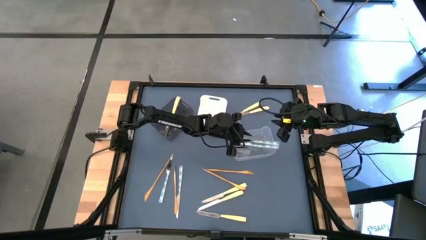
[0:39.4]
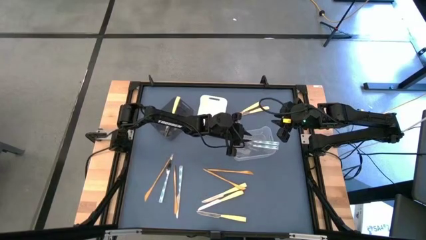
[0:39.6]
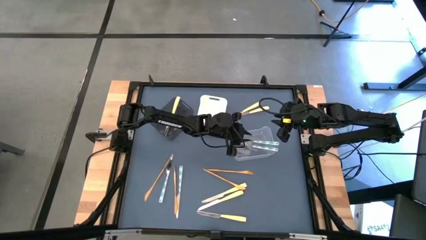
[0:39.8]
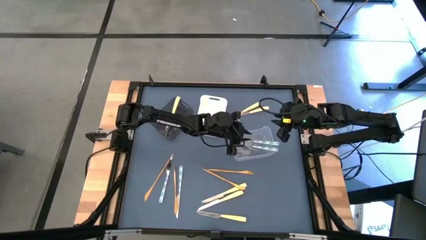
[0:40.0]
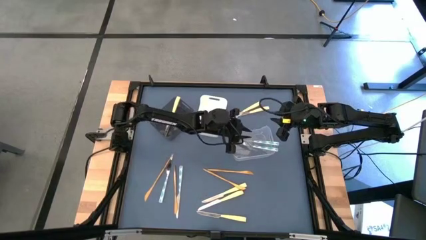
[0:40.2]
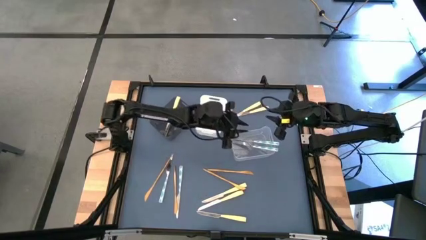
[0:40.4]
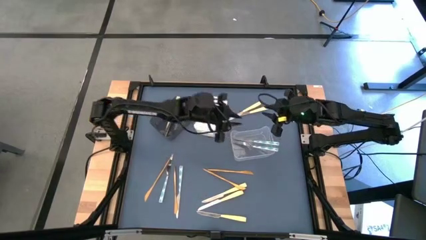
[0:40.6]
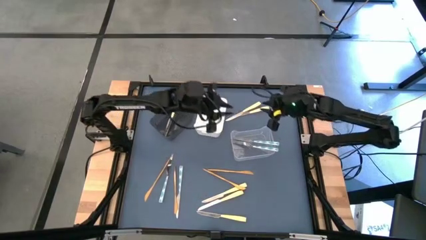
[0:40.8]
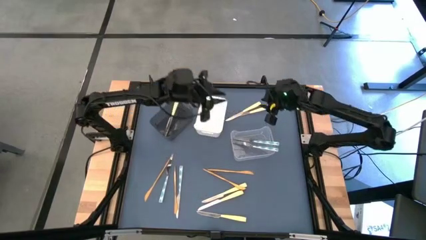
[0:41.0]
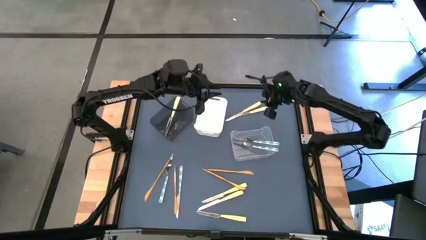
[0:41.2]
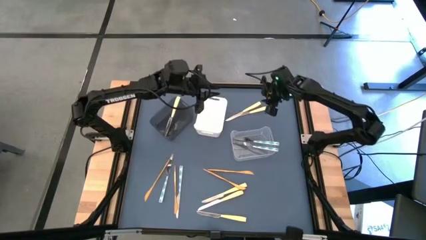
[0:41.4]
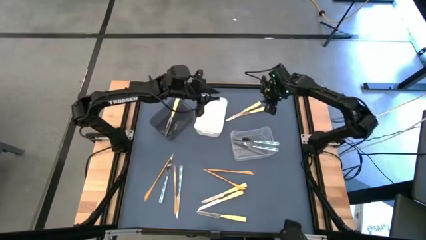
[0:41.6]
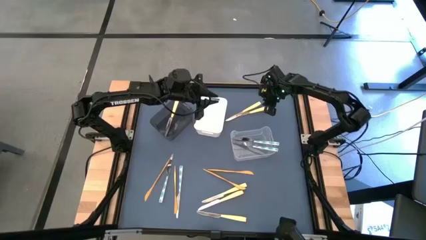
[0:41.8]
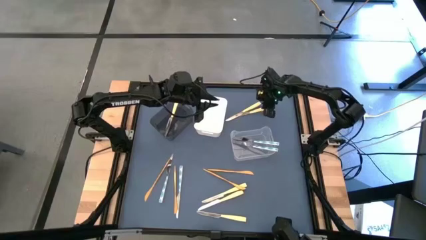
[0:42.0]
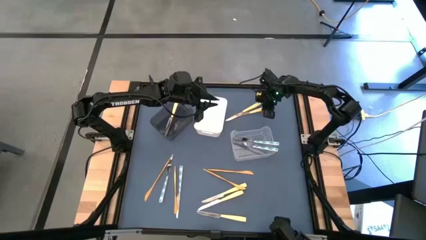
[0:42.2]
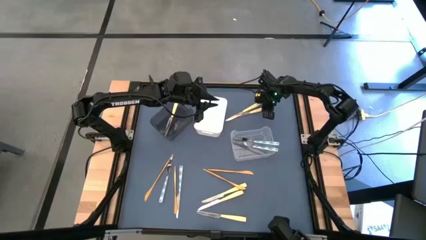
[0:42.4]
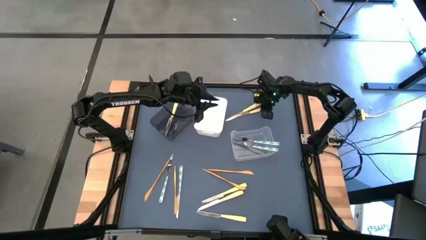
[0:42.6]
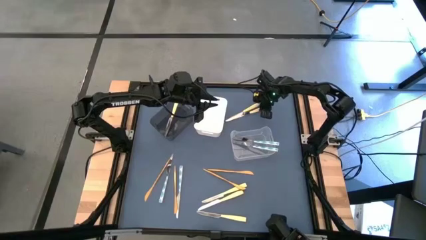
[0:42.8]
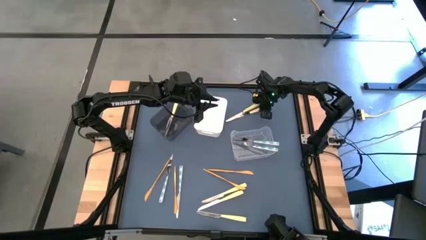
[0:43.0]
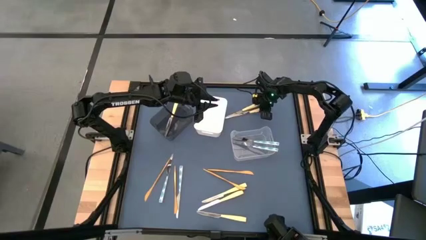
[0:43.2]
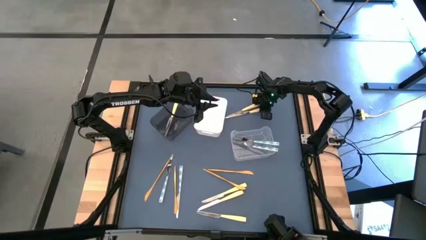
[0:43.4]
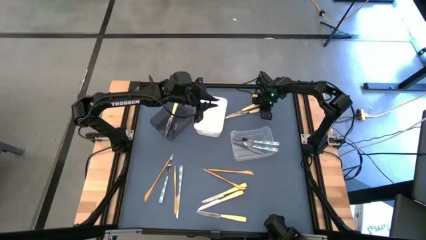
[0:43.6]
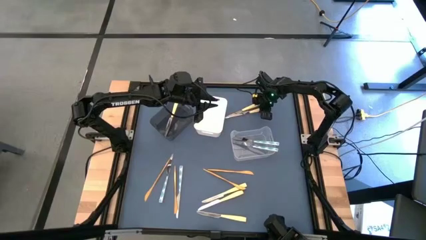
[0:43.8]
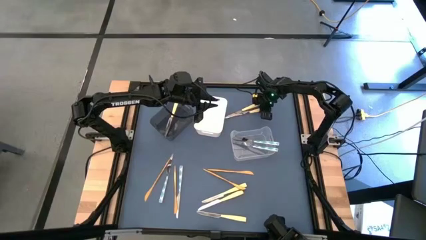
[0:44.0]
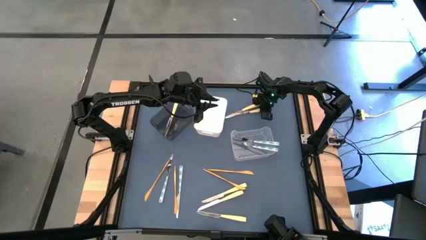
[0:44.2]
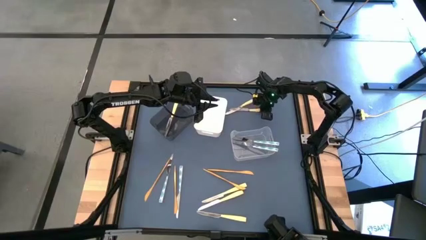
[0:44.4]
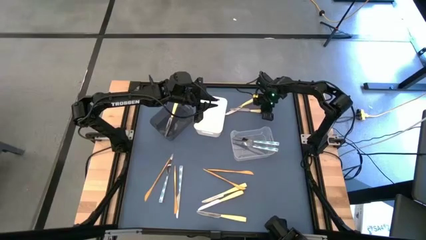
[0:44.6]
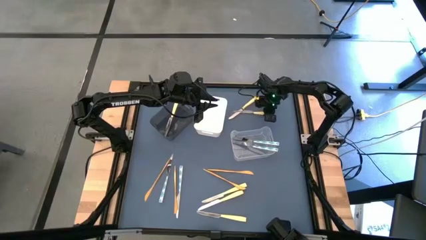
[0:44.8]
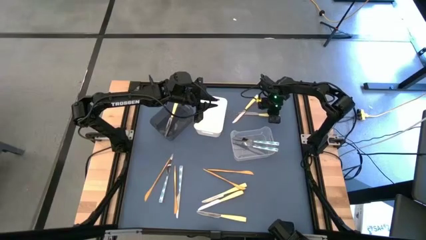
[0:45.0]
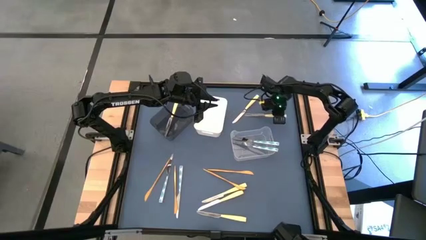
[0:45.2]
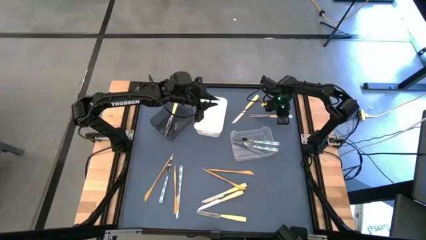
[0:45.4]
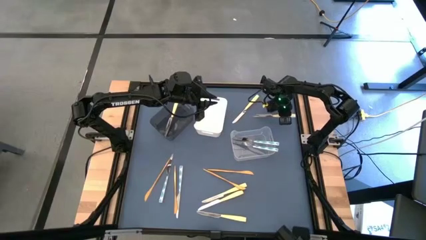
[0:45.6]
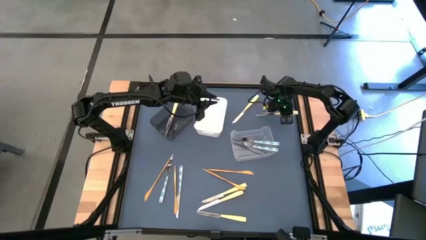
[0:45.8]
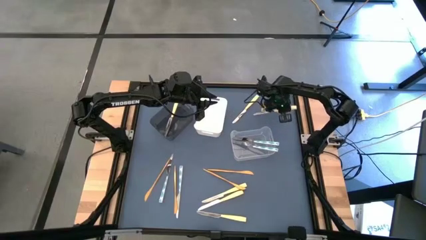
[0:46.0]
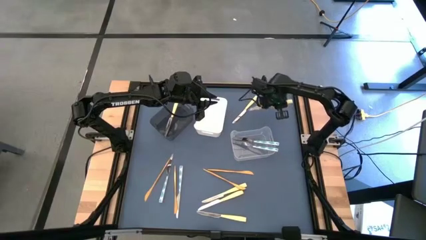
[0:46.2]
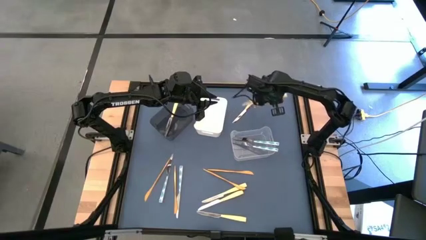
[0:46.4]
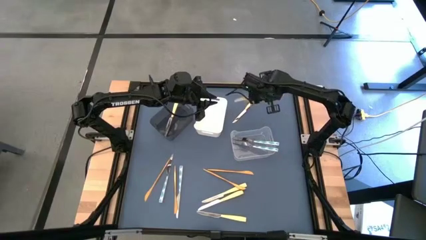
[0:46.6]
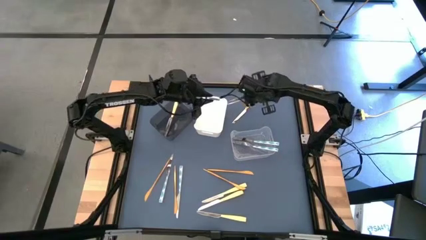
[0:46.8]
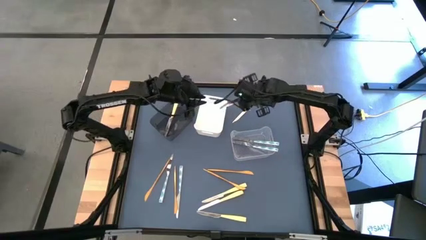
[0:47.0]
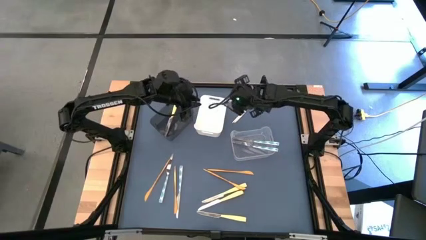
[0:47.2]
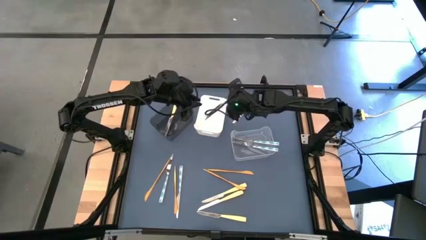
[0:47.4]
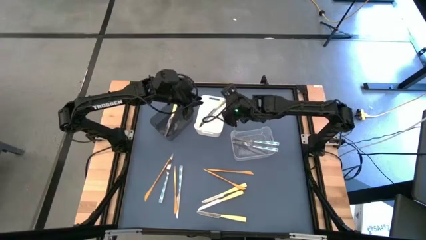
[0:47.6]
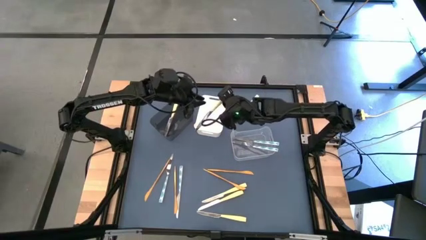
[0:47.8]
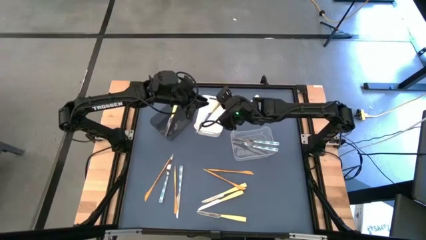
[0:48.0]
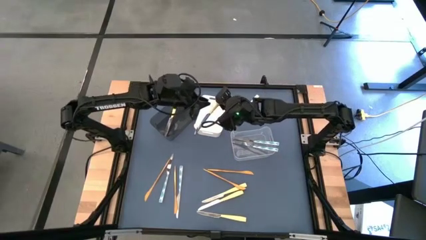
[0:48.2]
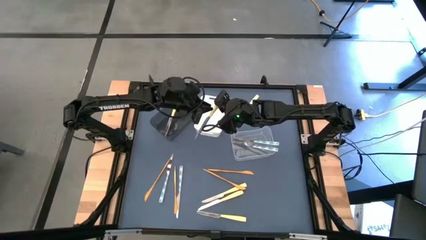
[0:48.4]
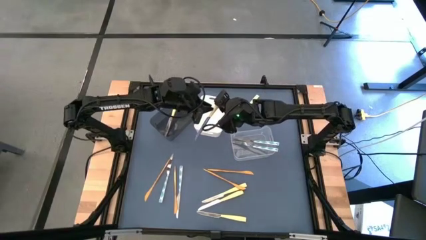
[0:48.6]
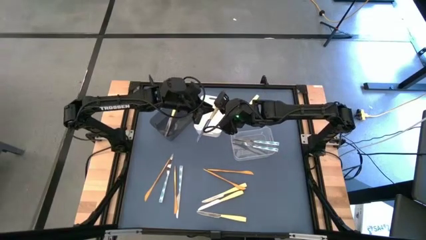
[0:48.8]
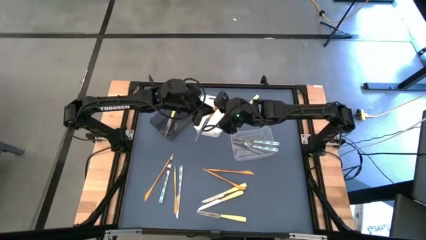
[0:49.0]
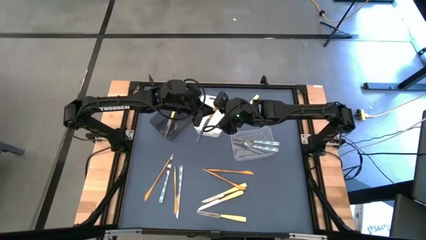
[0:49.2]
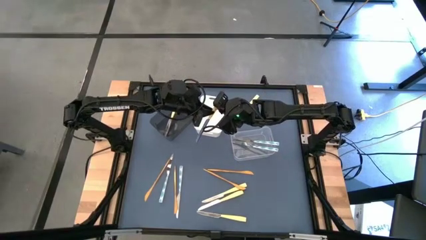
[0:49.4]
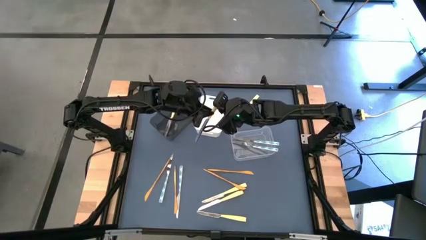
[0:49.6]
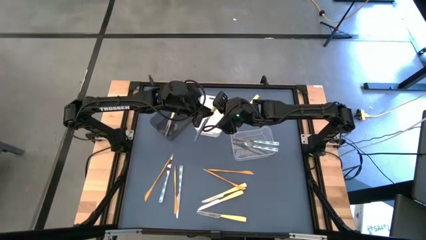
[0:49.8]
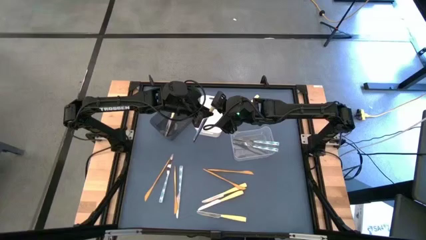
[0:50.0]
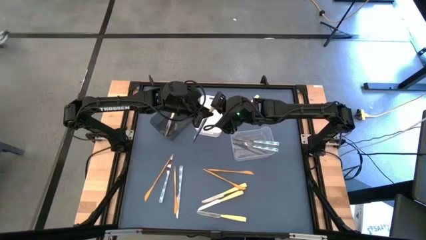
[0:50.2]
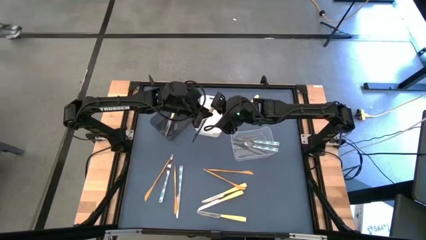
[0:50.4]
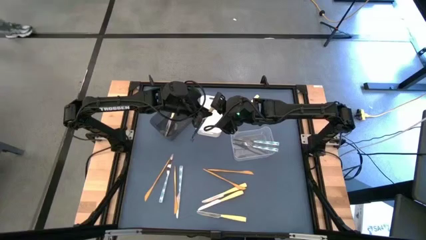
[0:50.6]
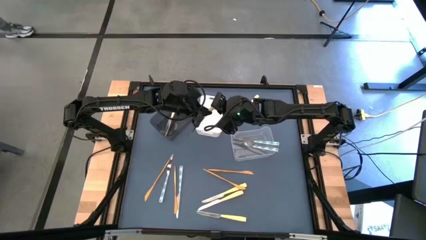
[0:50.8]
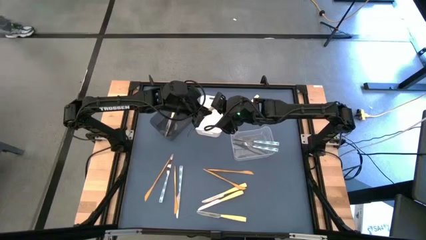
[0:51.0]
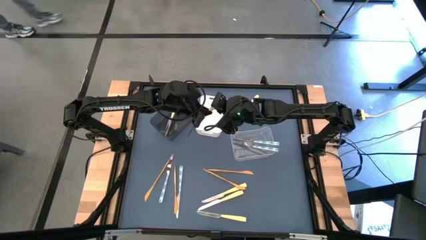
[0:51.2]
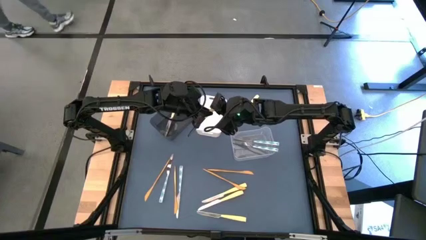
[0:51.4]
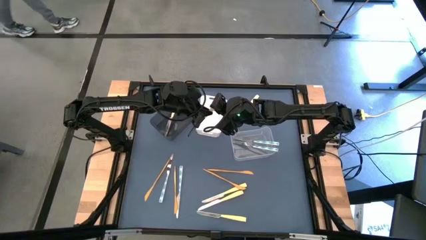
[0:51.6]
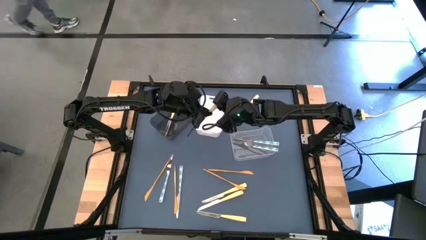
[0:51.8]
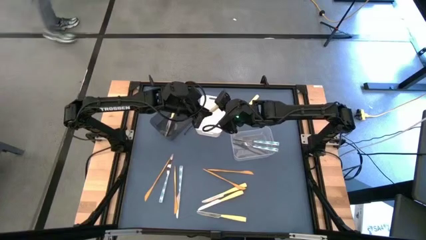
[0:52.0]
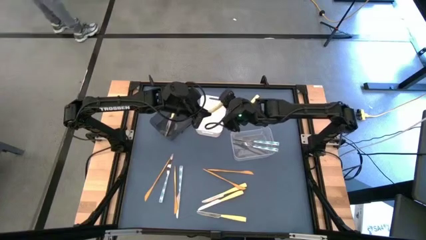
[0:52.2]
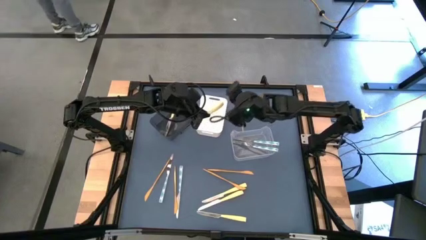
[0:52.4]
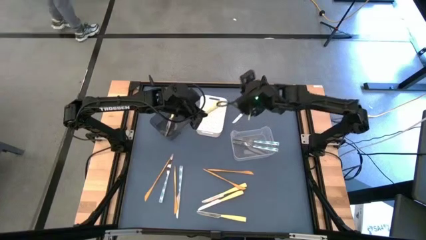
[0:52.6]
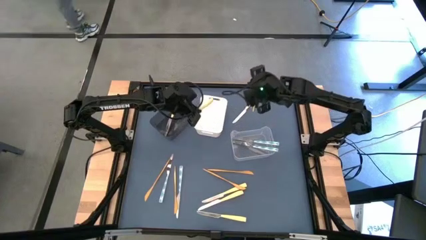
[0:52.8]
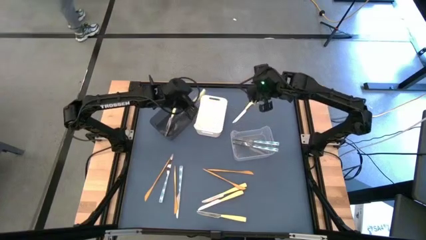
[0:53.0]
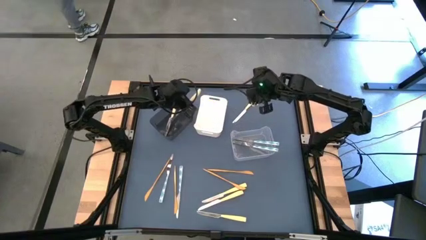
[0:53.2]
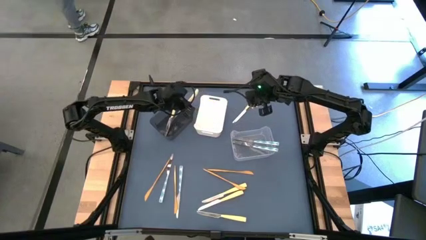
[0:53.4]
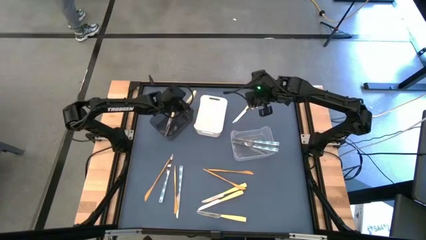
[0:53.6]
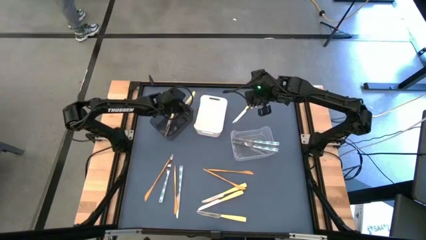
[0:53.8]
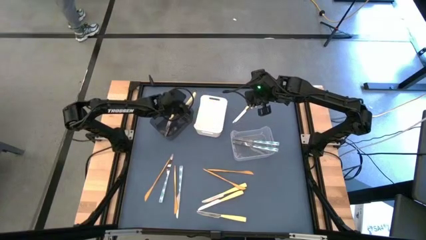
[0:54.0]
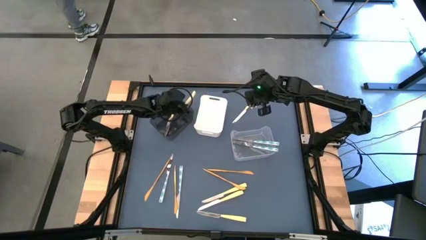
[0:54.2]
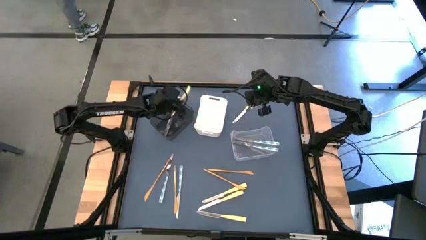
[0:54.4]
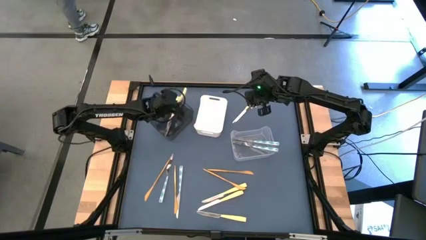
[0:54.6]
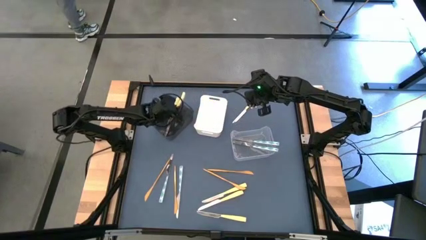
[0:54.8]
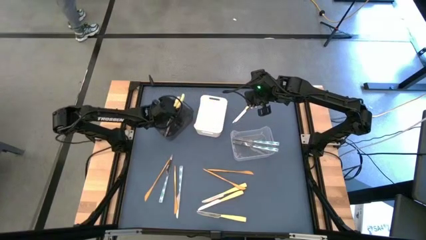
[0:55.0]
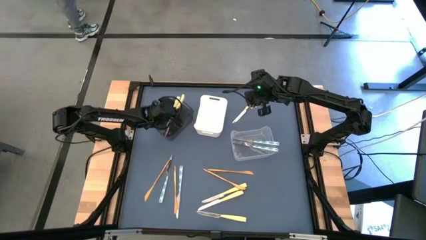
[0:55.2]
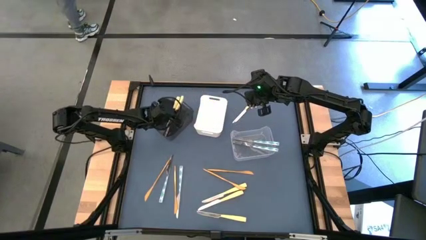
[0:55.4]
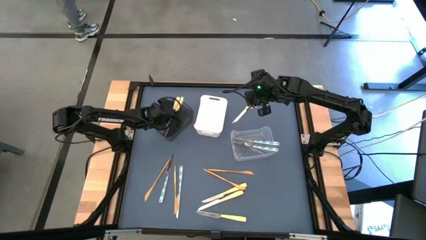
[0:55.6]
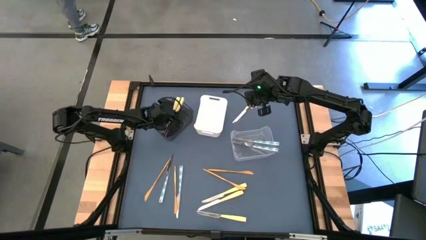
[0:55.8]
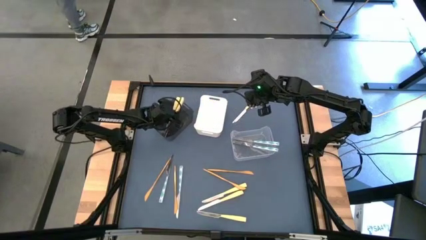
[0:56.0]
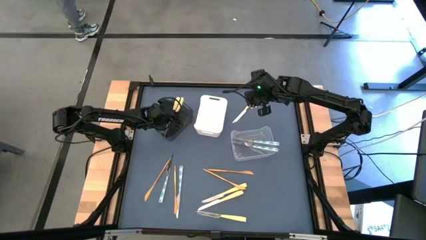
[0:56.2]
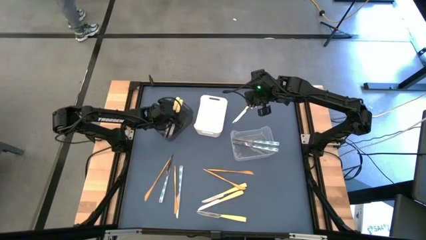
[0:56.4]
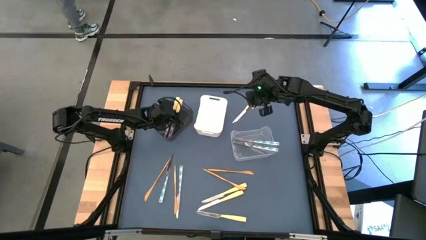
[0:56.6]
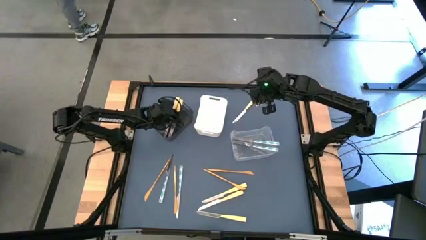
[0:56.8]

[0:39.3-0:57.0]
Task: Sort silverware by color (type)
Put the yellow knife into the black bin
